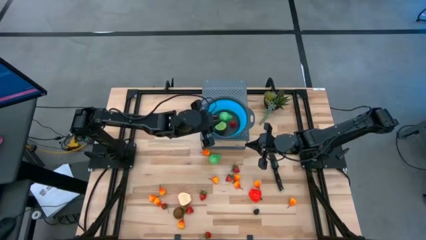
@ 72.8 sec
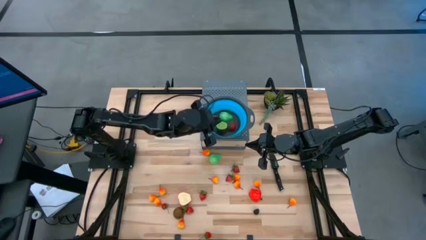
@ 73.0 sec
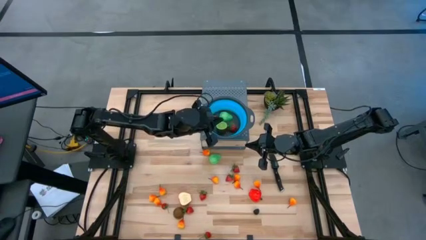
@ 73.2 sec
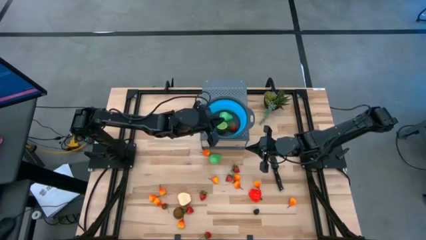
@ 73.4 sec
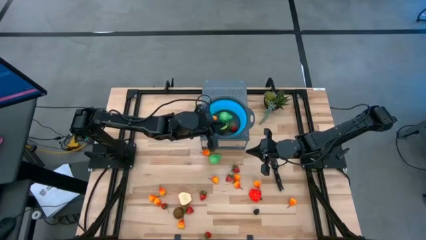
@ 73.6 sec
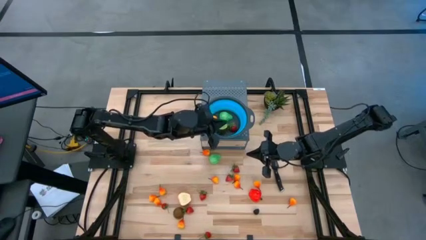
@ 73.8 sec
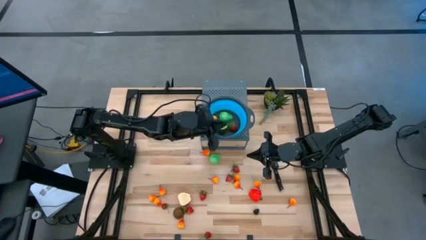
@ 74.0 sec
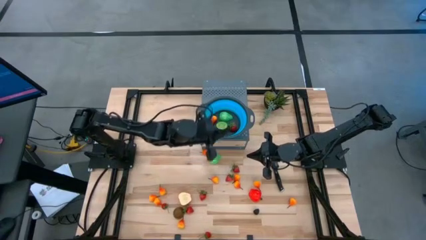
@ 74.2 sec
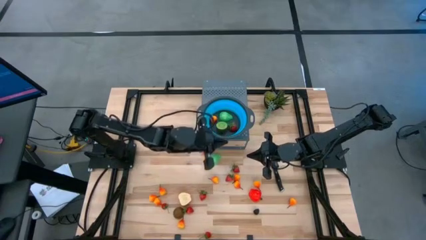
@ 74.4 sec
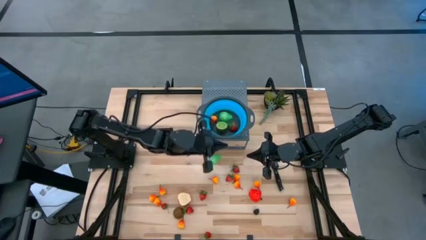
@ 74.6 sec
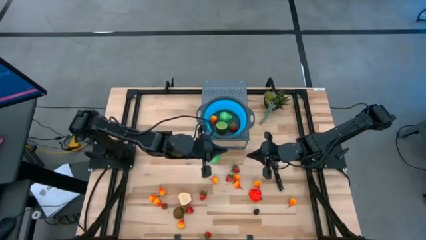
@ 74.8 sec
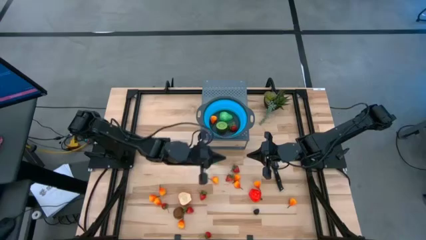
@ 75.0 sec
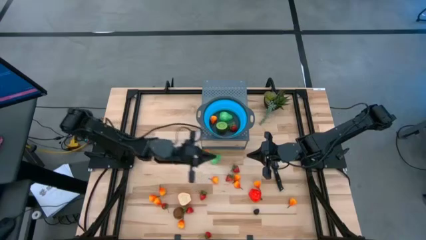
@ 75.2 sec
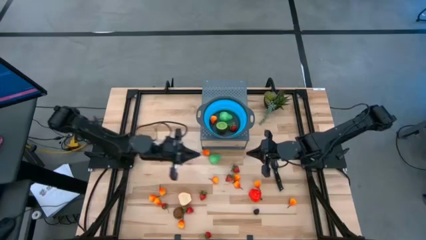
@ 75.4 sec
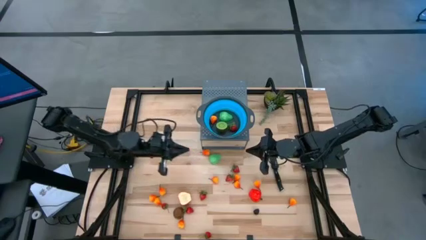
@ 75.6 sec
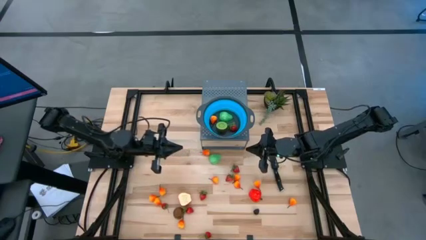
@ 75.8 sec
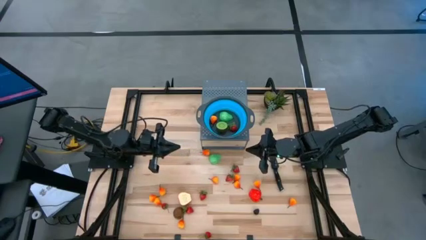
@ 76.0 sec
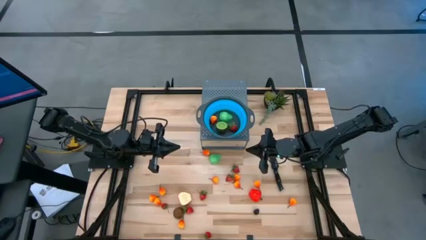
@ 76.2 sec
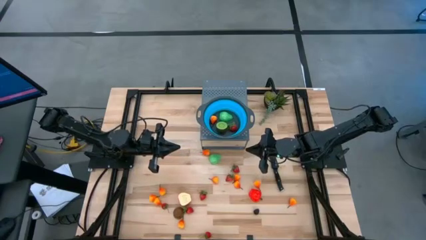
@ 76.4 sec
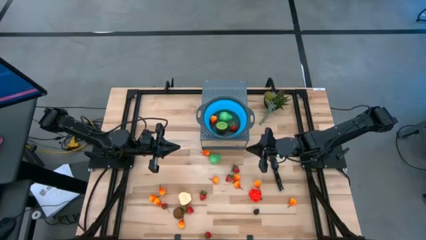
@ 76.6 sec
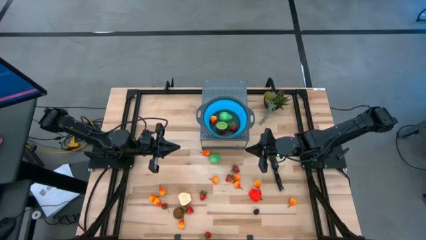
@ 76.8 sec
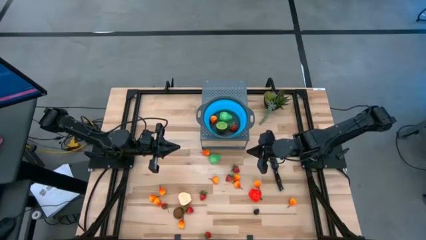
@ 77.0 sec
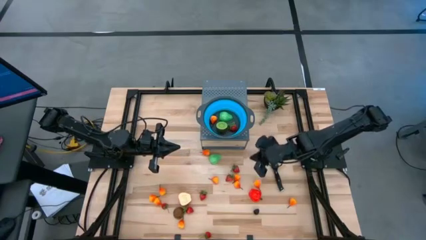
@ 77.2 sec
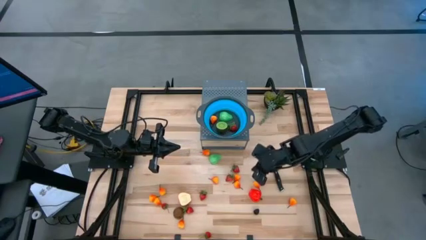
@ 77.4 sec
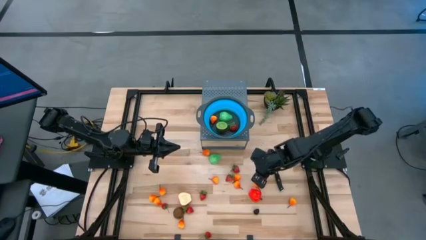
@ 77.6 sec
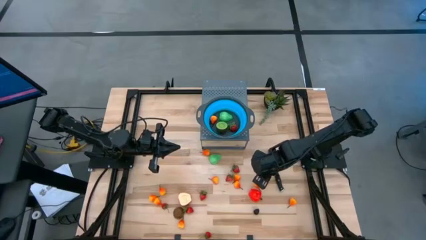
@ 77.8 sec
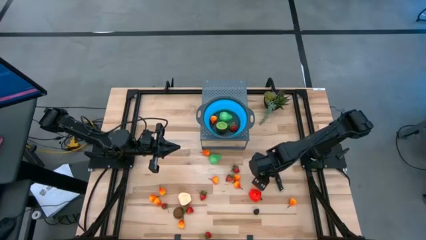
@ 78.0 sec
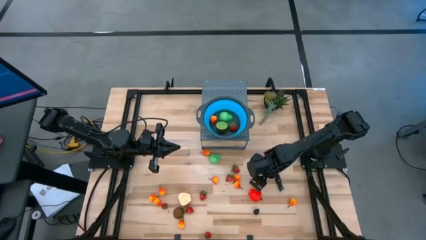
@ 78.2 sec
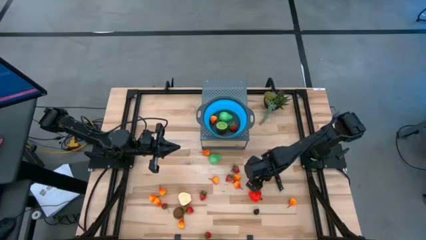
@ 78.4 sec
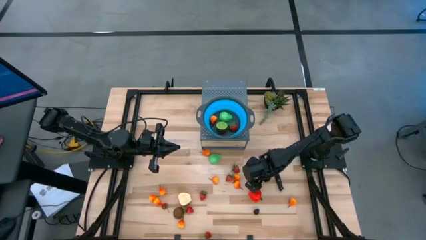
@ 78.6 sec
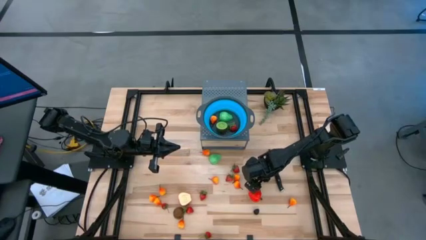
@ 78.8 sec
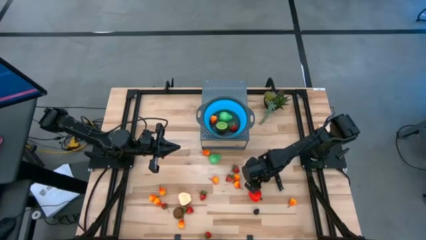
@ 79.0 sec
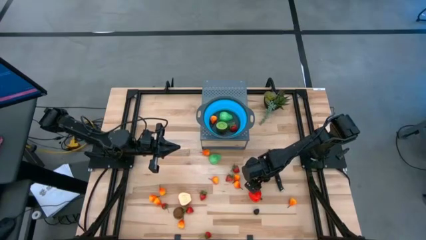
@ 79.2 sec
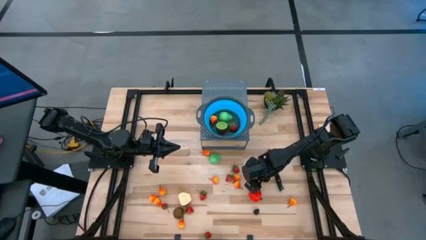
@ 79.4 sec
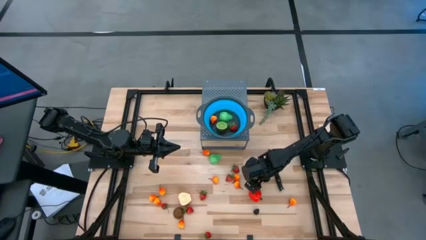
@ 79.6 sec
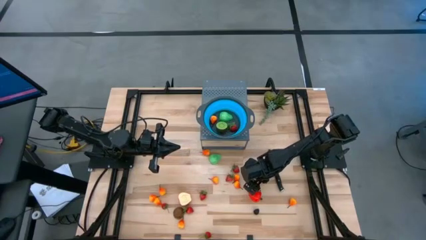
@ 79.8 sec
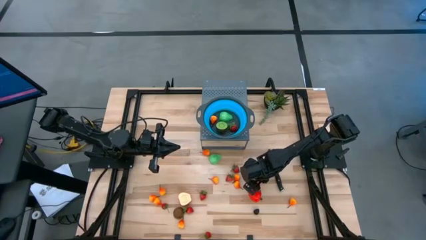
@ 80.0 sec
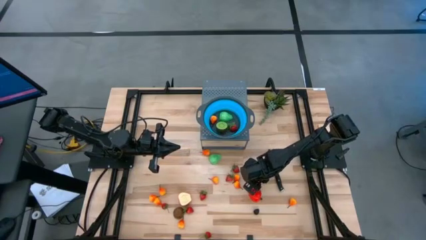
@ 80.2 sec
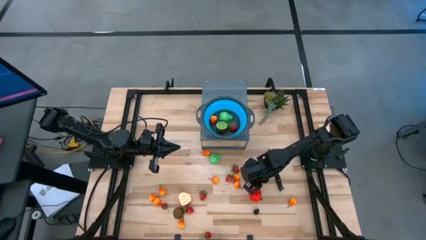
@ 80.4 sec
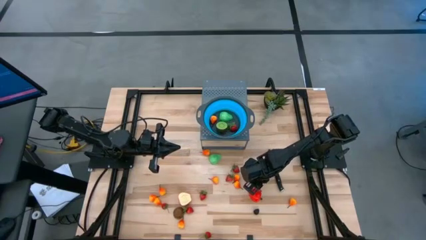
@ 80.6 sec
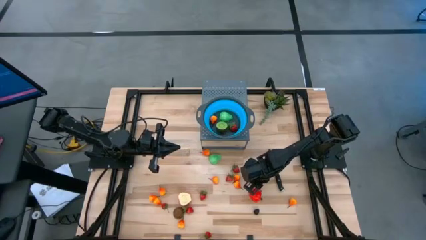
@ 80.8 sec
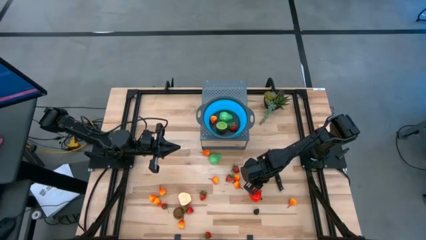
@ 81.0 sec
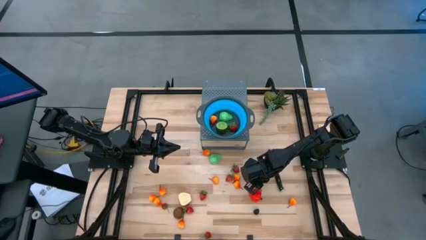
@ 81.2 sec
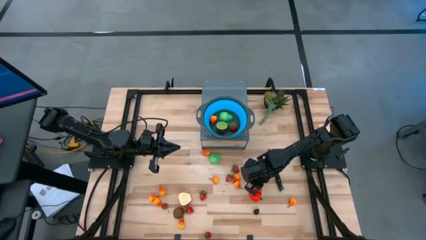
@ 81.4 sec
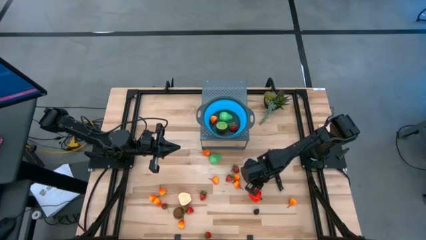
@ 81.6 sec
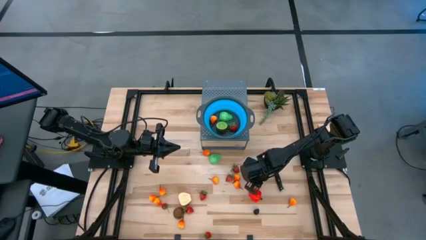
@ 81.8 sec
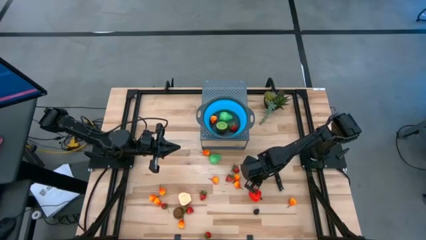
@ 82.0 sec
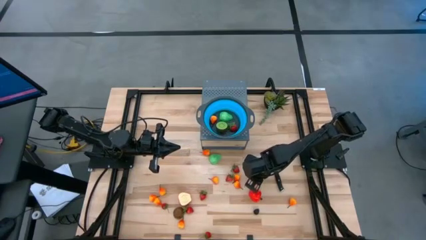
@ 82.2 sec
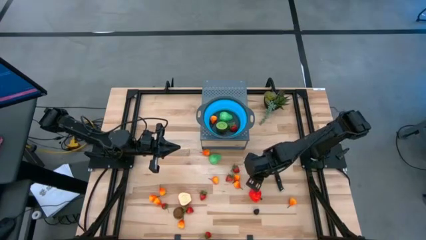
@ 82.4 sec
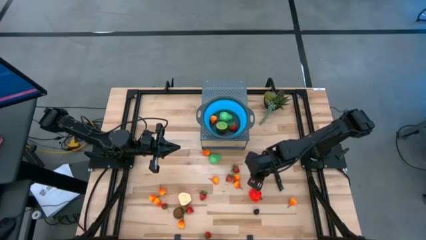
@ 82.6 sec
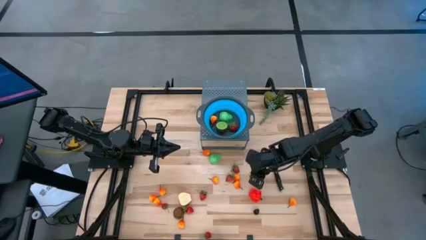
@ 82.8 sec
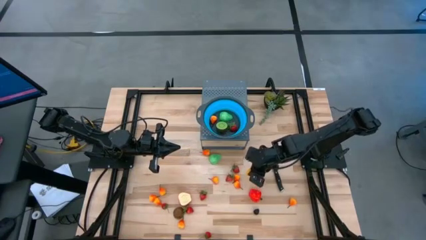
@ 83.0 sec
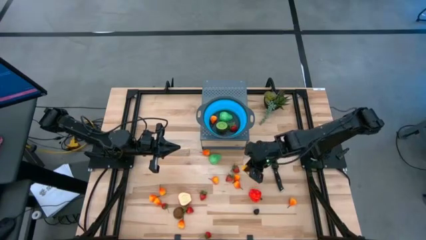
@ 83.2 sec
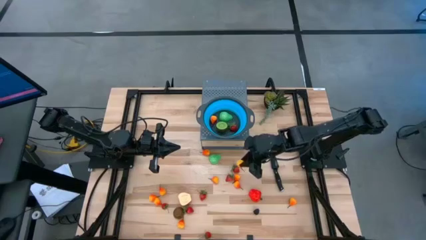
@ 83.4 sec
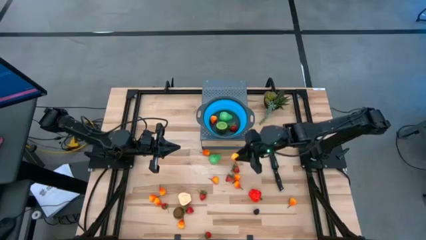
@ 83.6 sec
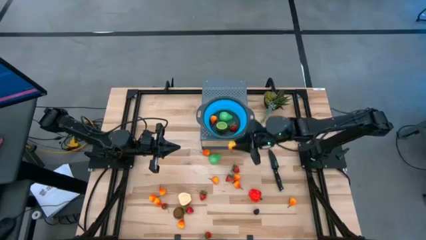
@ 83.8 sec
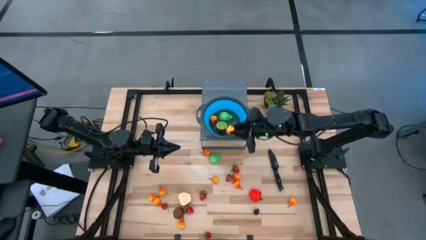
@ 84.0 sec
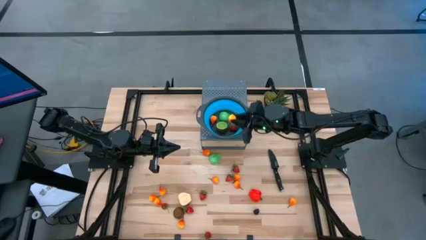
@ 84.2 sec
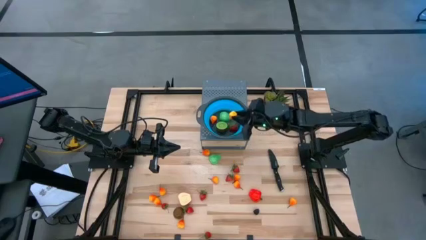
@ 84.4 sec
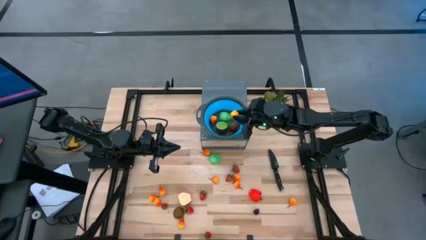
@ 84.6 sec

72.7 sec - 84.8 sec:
Task: Pick & Place Fruit
Put the peach into the strainer bowl
